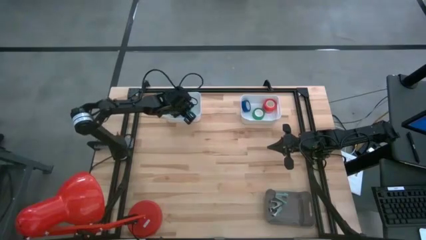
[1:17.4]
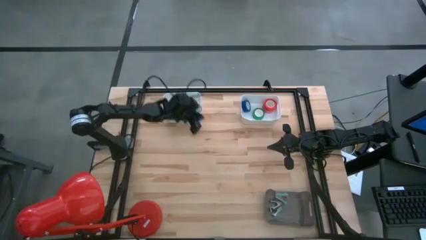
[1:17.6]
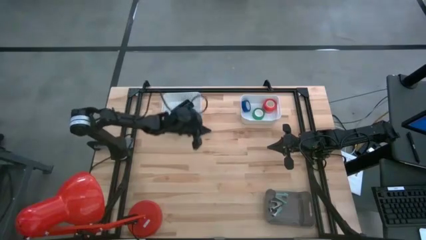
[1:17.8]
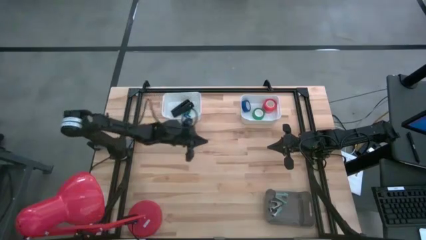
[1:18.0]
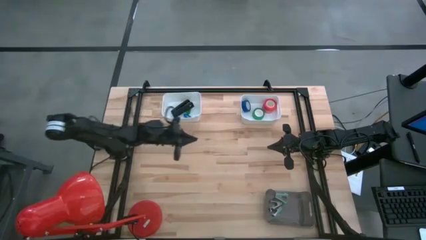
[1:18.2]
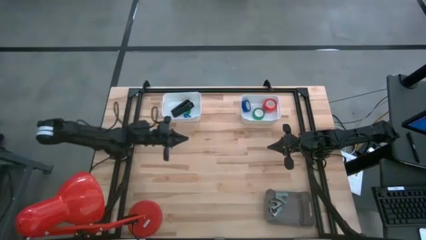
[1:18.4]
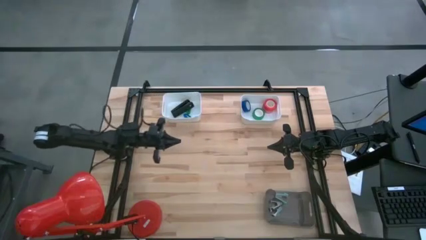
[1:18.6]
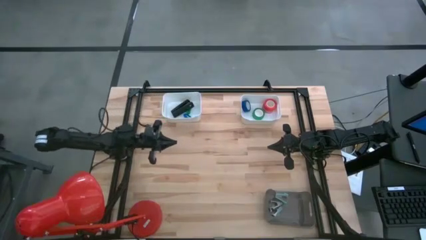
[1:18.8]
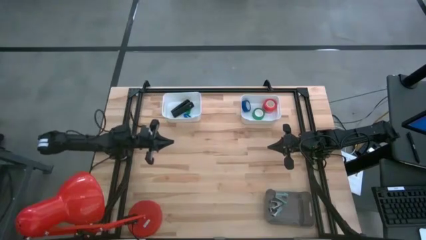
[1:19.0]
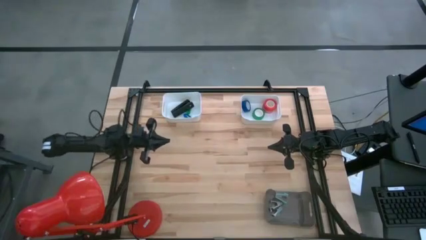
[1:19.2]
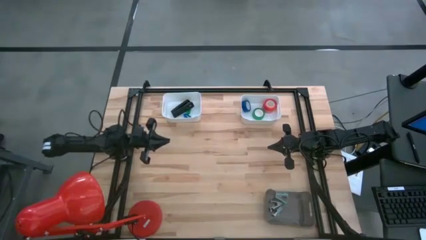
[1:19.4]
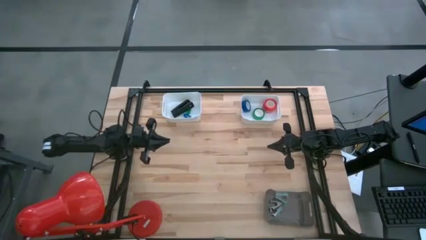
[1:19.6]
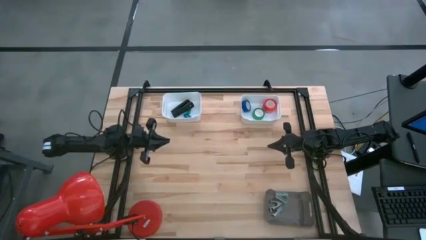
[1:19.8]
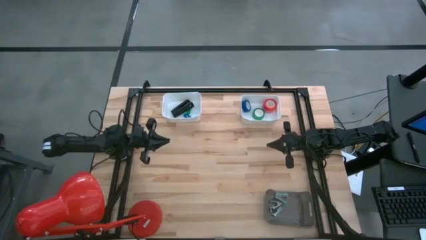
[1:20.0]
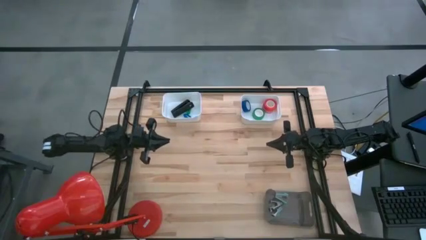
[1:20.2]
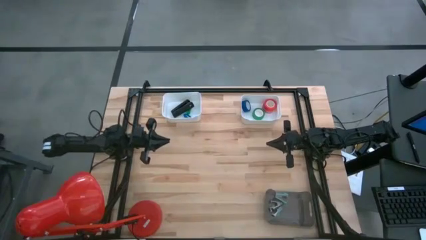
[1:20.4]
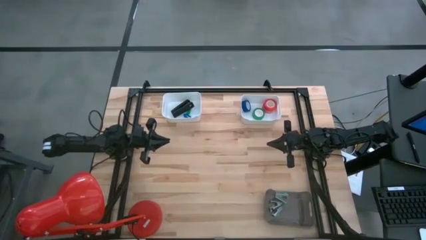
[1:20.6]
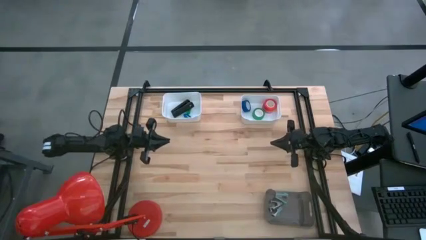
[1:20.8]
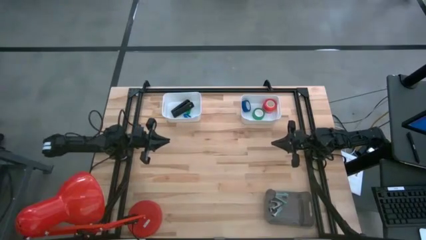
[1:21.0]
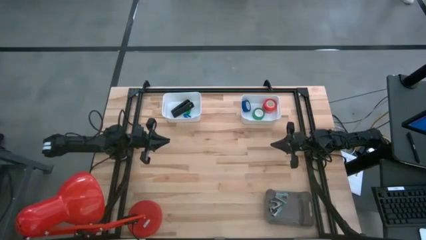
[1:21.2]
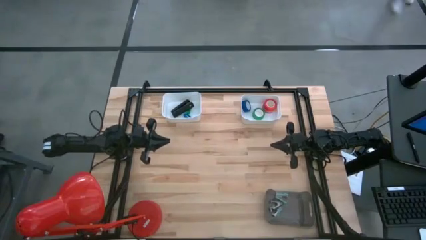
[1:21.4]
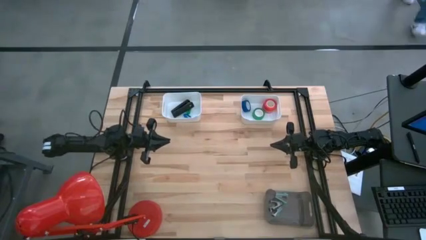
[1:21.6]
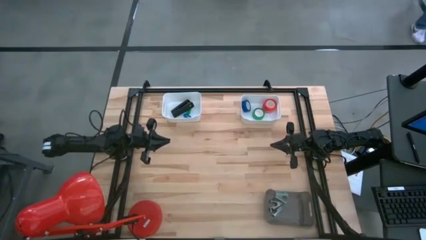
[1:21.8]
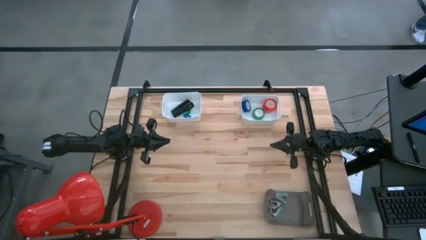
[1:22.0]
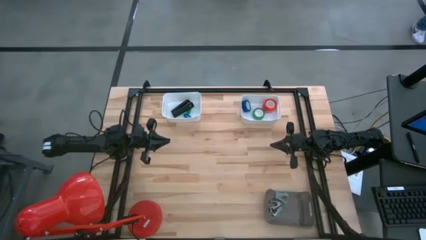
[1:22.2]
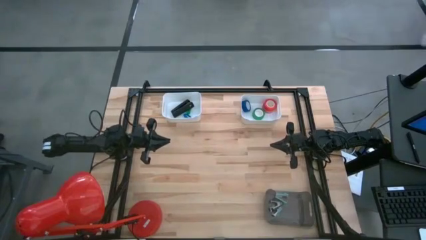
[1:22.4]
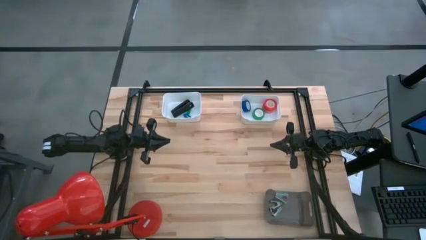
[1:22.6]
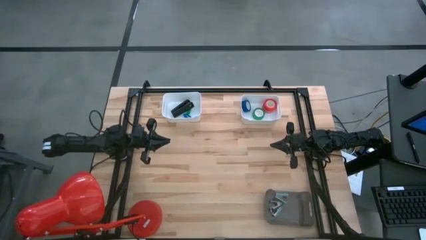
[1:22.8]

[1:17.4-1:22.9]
Task: Pick and place Stapler, Stapler remover, tape
Return to Home Position

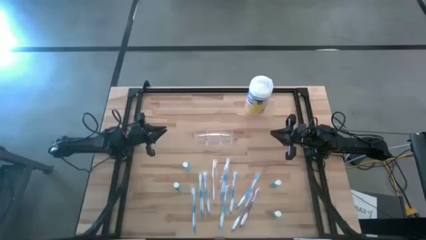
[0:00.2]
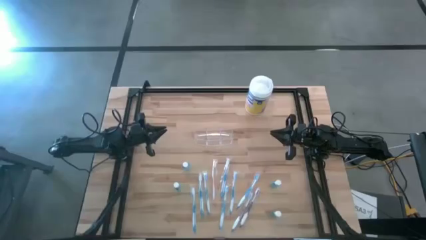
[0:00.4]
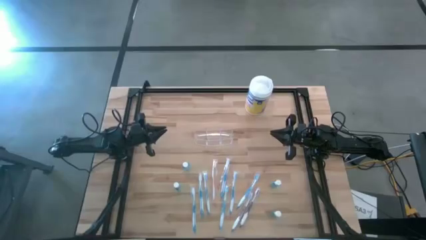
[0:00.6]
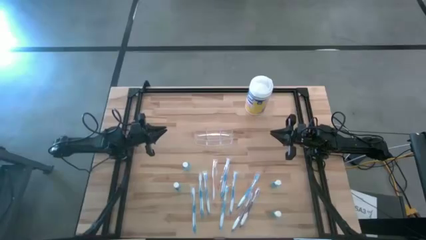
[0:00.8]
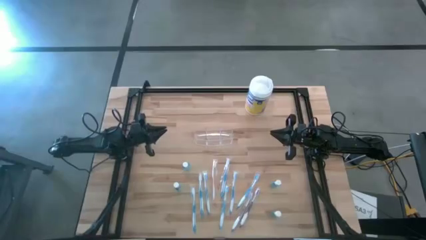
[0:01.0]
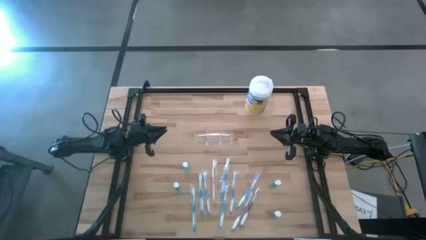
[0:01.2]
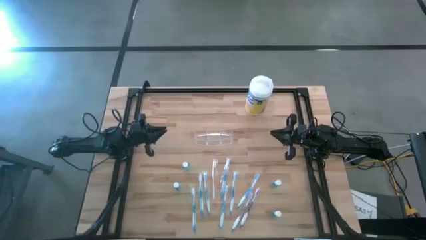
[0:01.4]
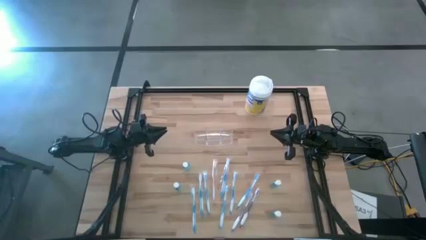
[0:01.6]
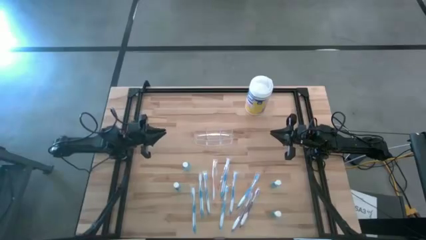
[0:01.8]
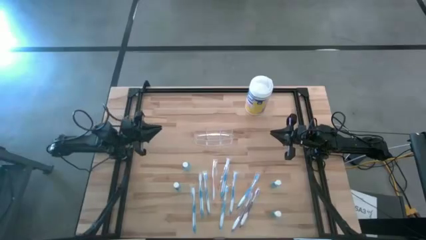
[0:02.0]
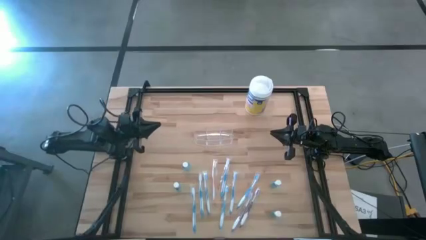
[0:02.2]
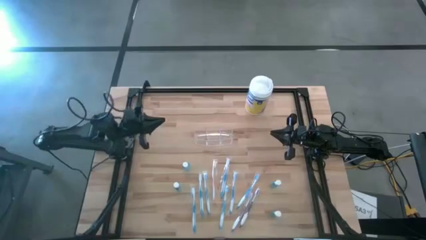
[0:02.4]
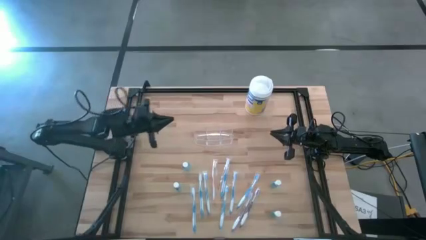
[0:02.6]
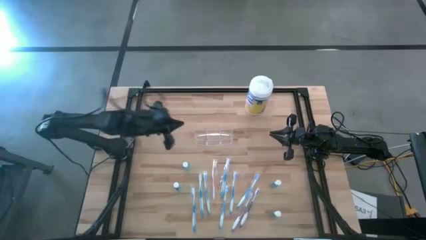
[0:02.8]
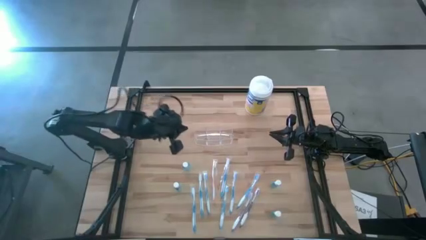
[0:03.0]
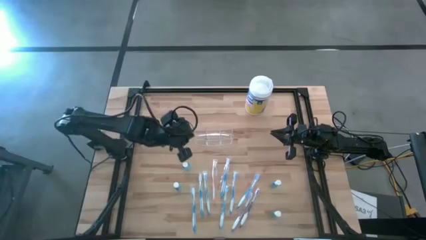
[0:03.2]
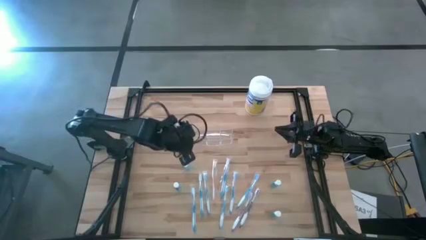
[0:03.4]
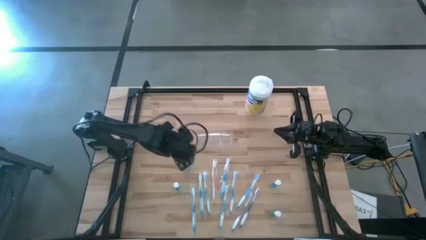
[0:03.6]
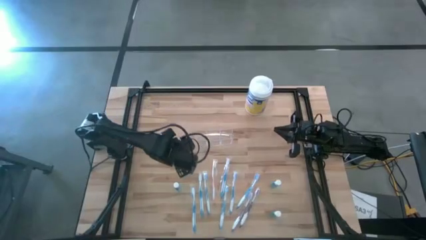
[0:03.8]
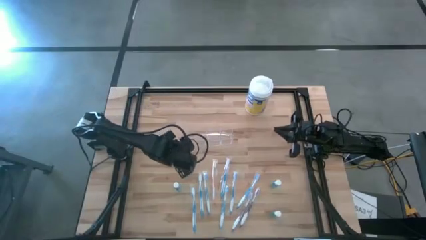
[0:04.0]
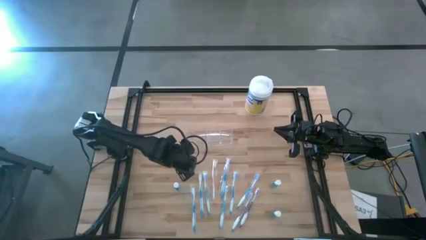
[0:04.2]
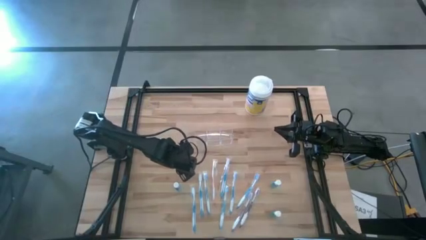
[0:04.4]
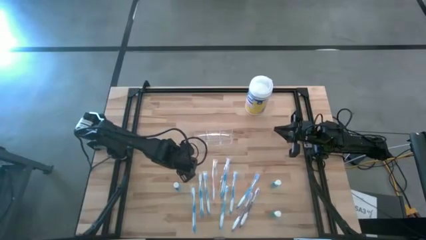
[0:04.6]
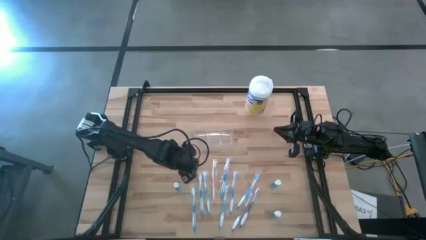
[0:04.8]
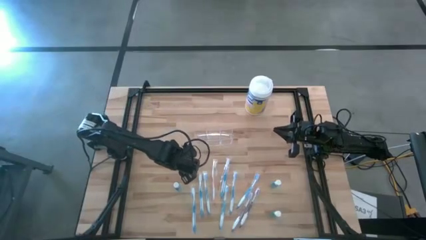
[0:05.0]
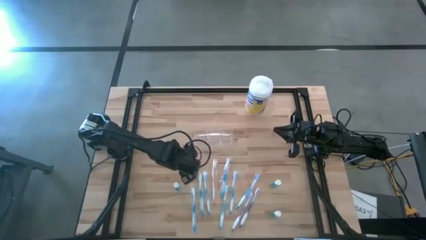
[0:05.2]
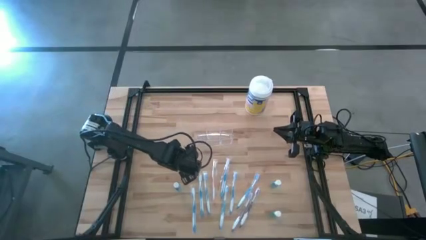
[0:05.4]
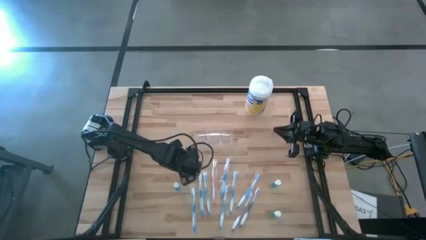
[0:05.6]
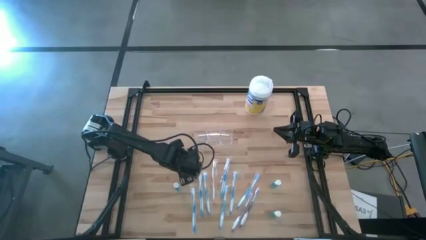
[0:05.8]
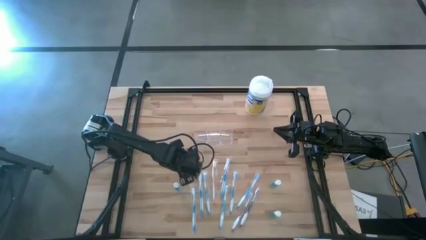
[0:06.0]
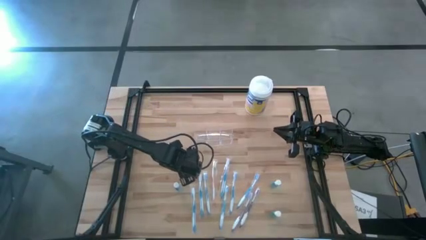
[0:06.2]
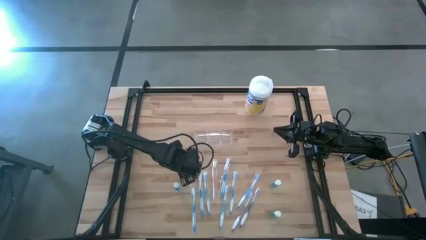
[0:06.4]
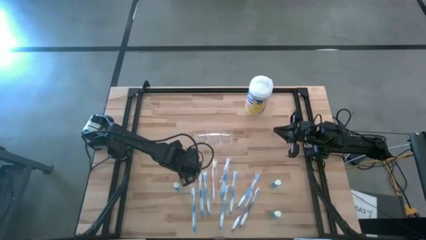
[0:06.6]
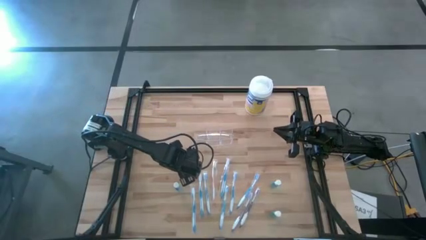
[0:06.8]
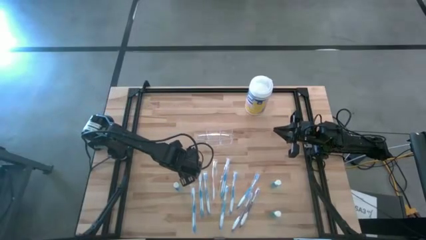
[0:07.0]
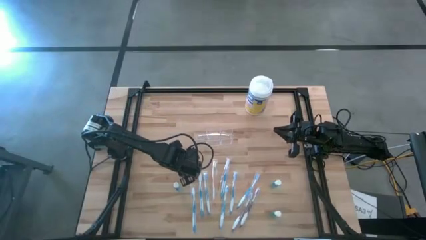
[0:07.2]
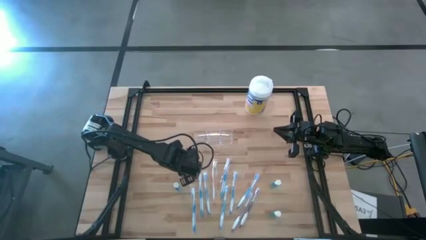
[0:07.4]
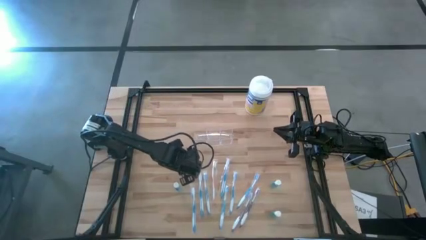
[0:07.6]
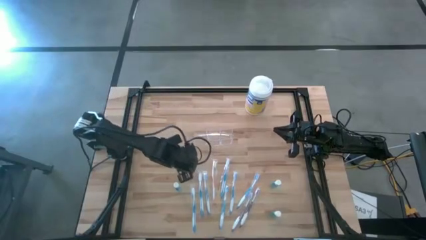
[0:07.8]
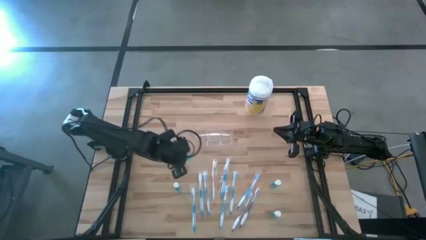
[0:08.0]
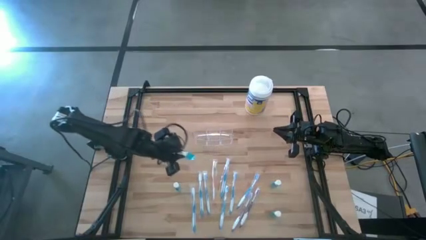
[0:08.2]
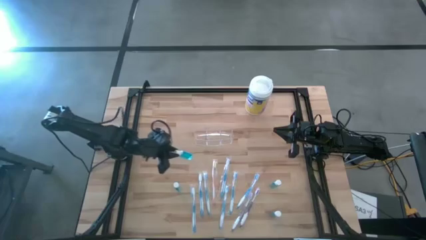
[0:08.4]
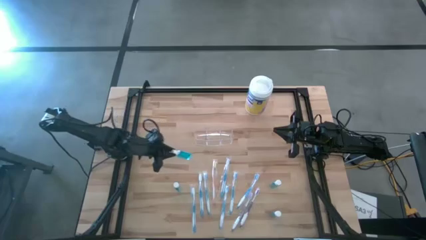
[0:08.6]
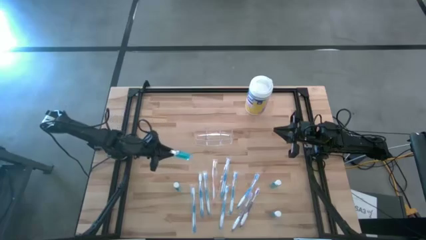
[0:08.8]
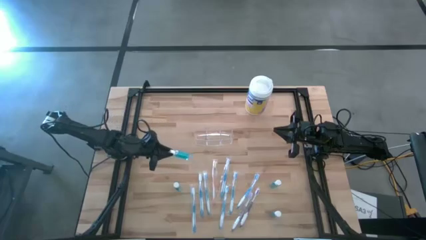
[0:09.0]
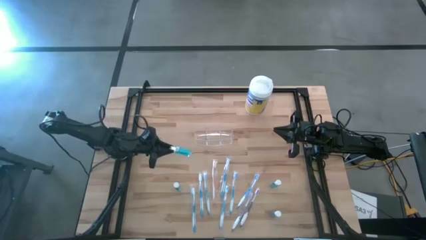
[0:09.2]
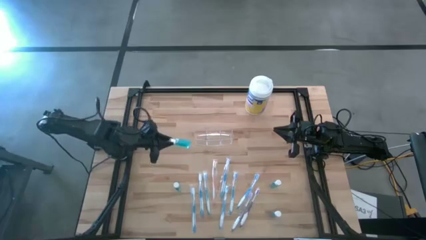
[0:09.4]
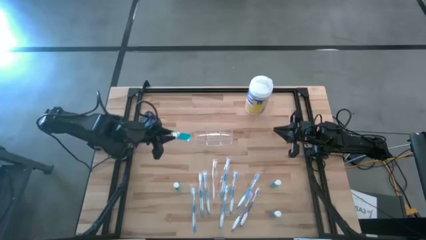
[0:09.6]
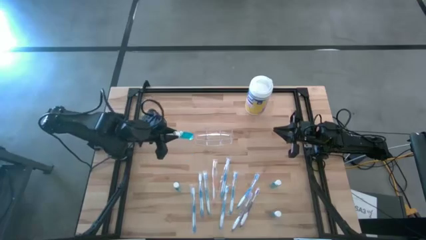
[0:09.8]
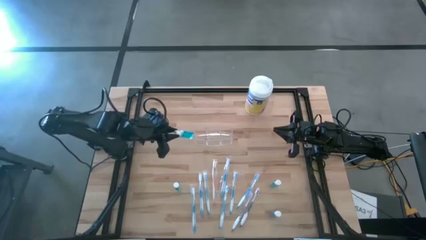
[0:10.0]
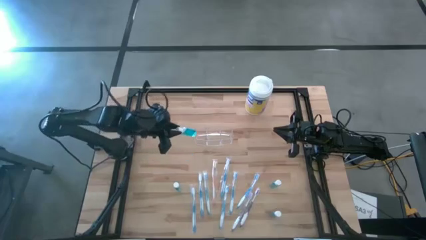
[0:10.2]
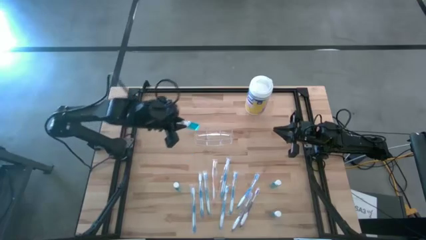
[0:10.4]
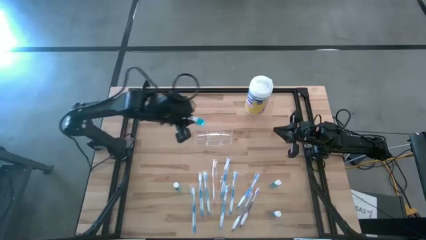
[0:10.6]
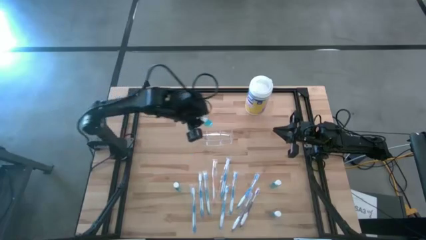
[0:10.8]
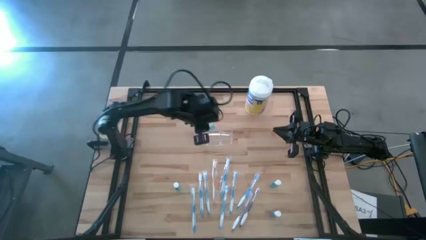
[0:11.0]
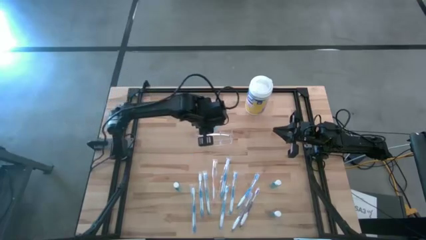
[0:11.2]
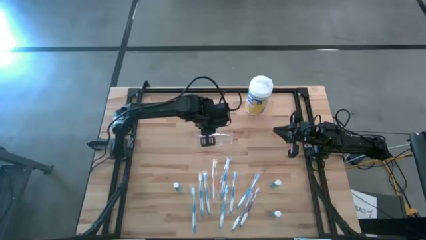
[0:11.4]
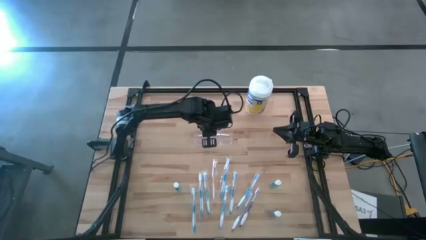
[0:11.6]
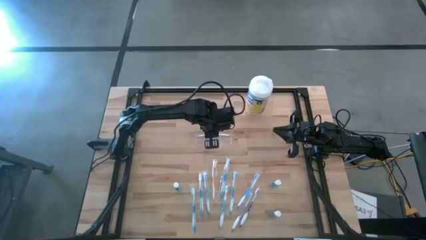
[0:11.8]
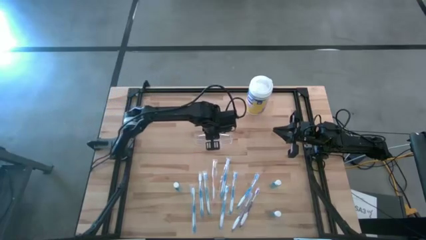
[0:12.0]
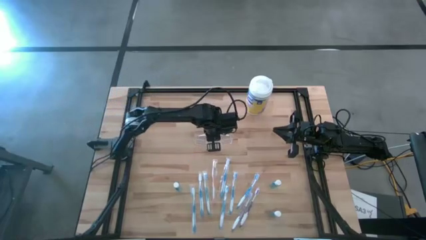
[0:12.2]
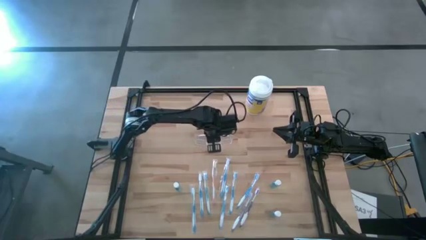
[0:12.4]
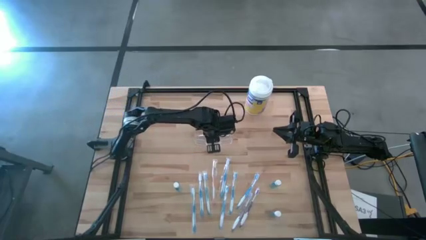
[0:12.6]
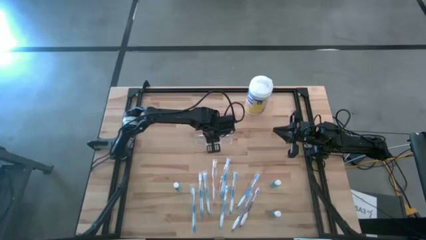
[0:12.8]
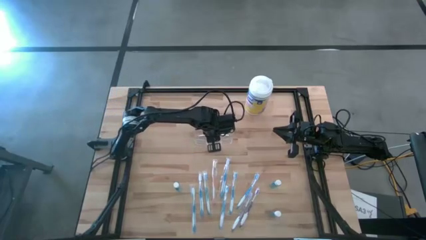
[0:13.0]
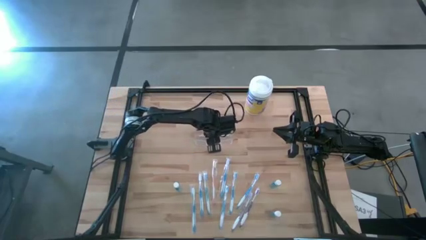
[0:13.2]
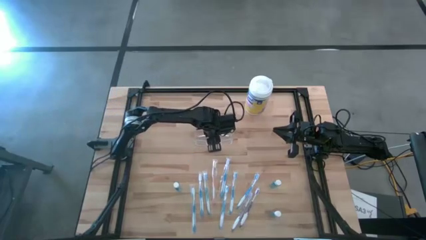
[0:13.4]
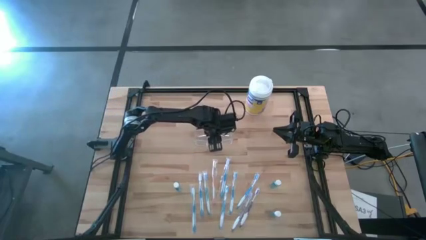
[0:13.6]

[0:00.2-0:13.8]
Task: Pick & Place toothbrushing station
Put the blue mouthwash into the transparent organizer
